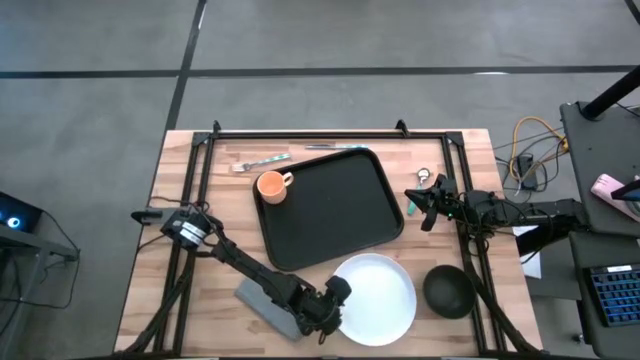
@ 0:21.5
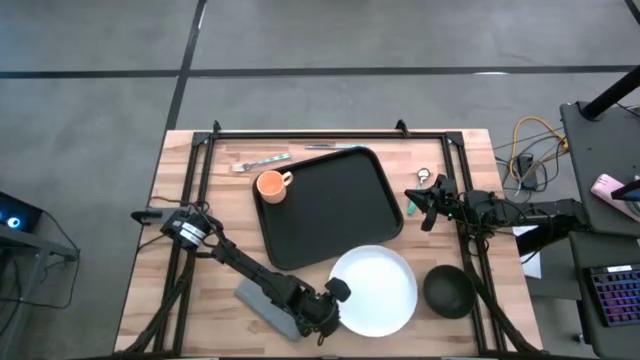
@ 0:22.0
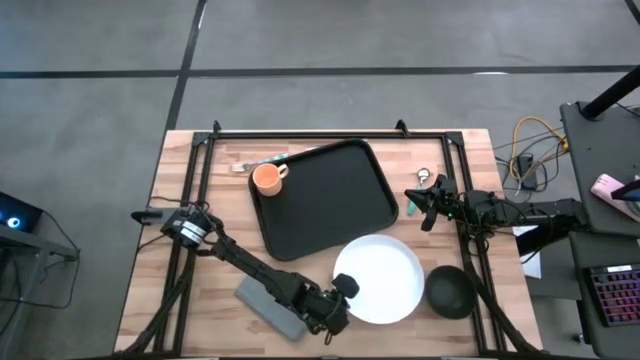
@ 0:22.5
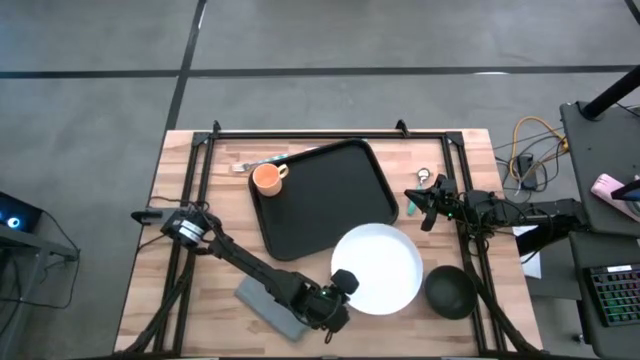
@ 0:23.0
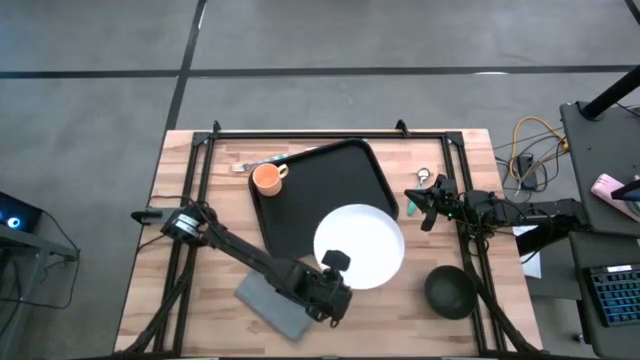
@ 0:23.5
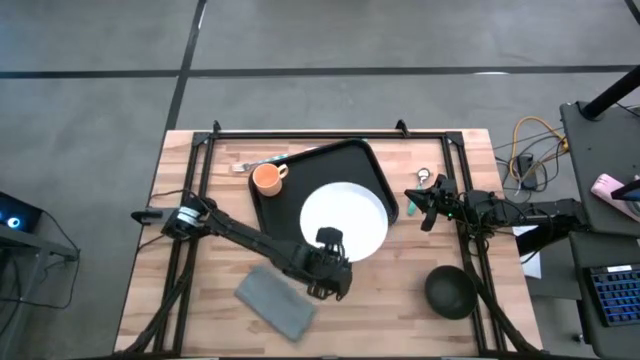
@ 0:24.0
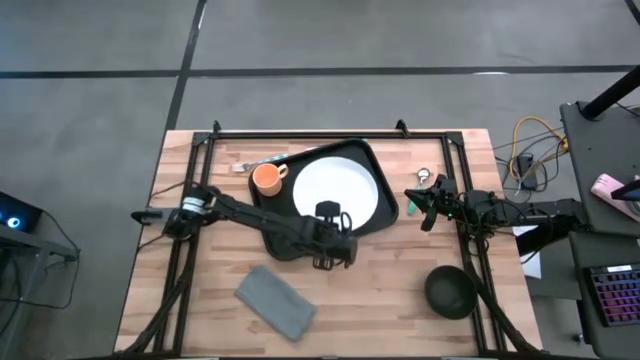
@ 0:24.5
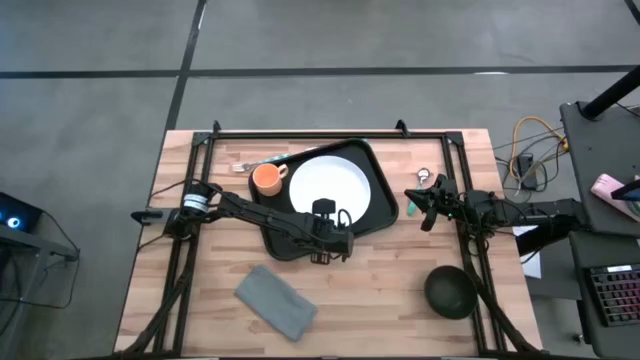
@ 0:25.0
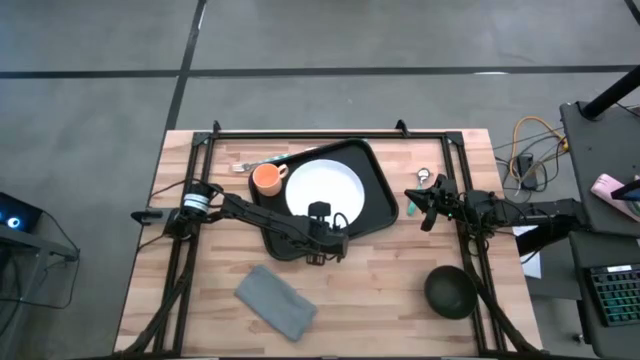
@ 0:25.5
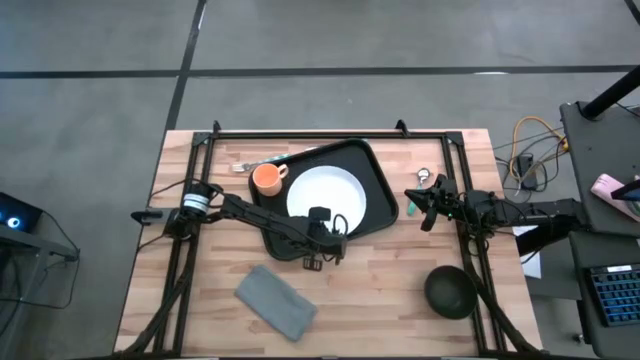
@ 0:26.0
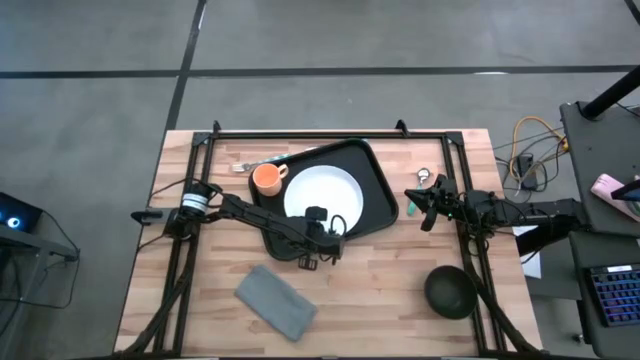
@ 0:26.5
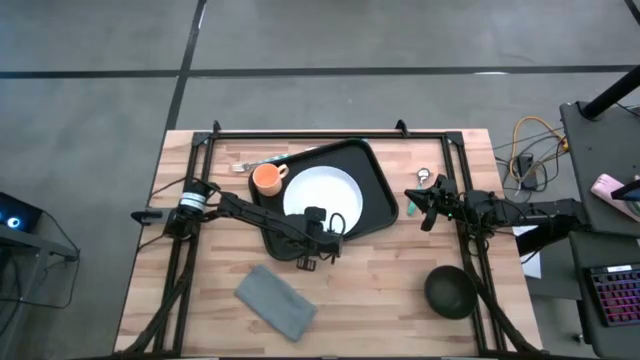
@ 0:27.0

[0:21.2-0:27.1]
Task: Set up tray
Put the white plate on the black tray to the right of the light orange mug

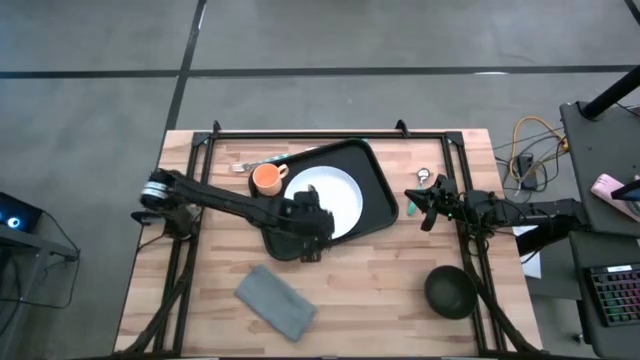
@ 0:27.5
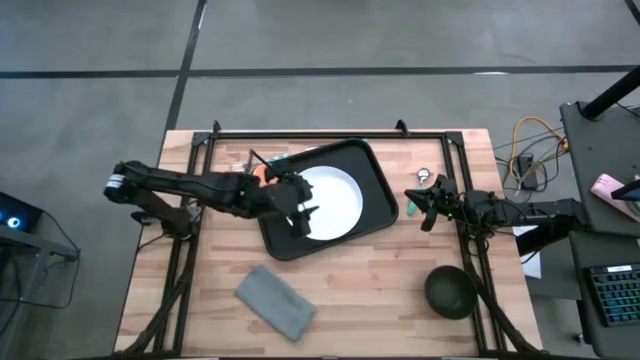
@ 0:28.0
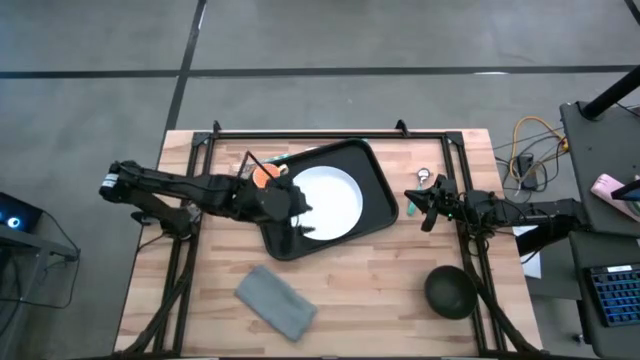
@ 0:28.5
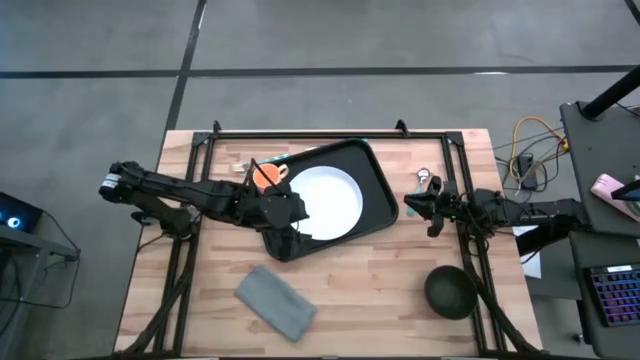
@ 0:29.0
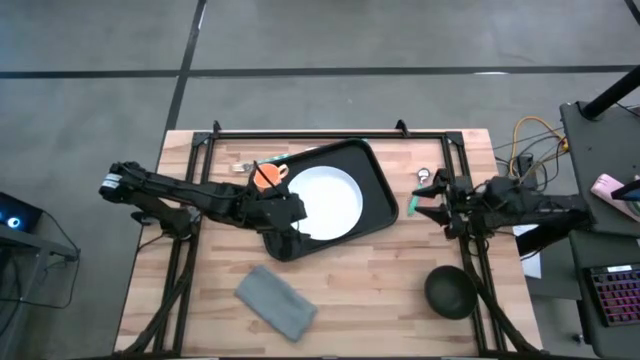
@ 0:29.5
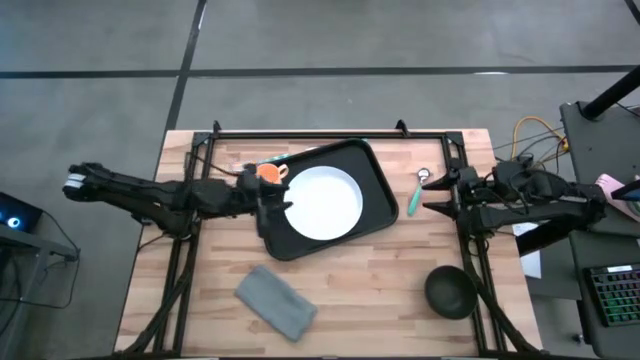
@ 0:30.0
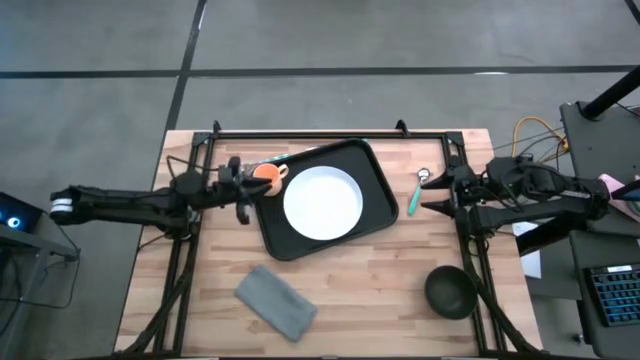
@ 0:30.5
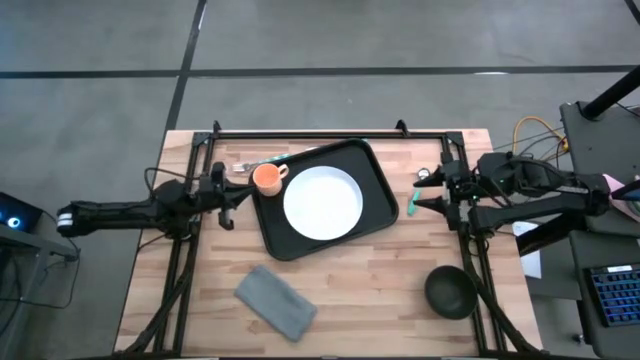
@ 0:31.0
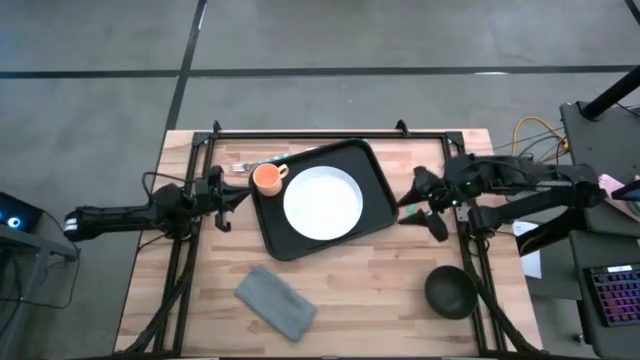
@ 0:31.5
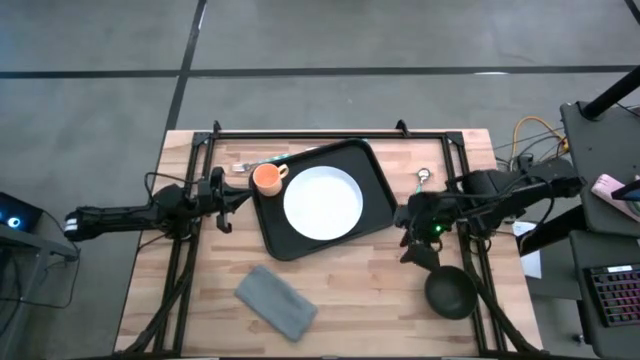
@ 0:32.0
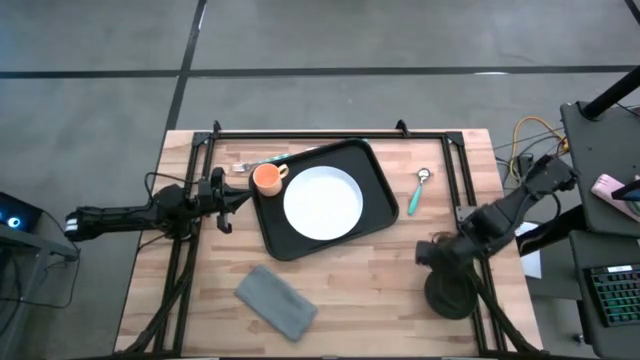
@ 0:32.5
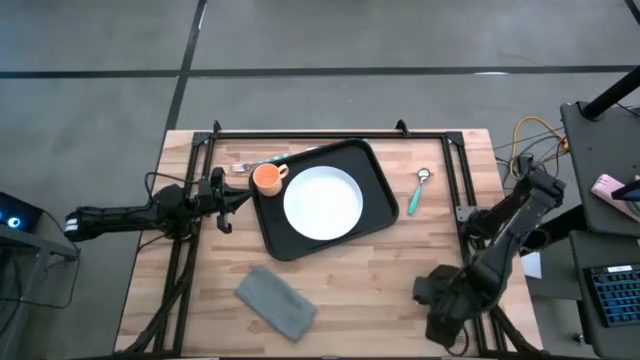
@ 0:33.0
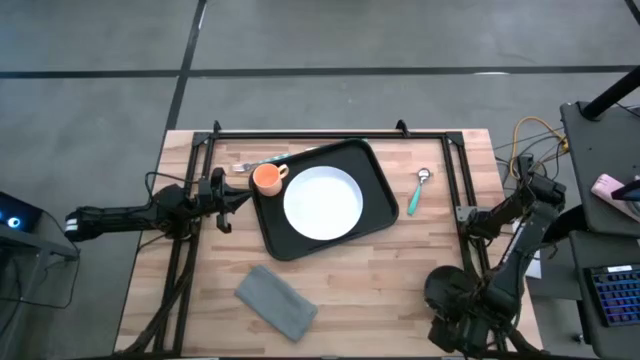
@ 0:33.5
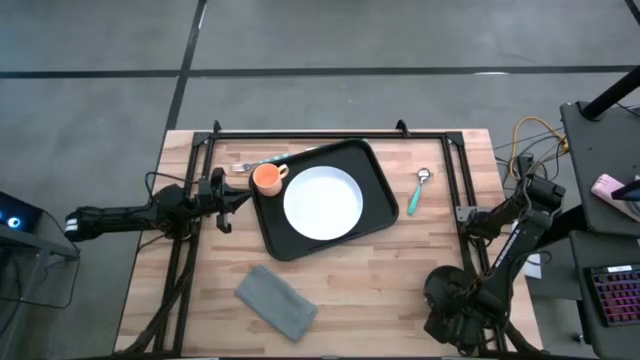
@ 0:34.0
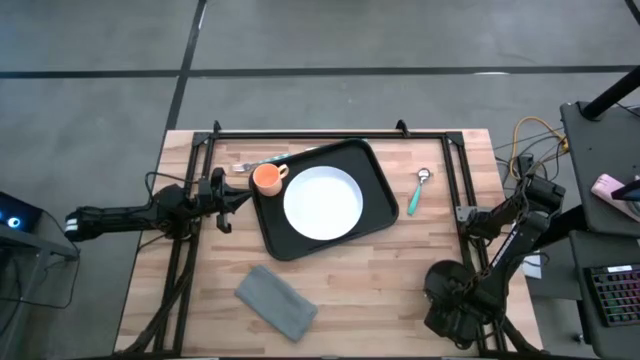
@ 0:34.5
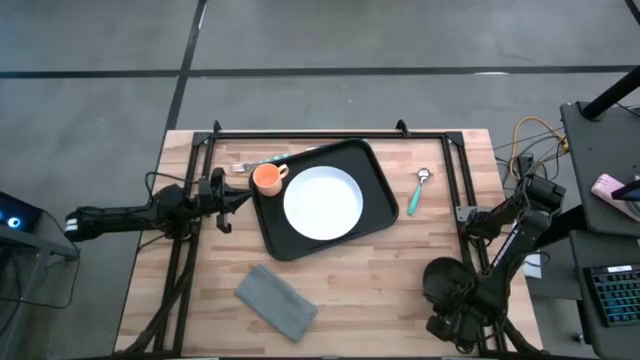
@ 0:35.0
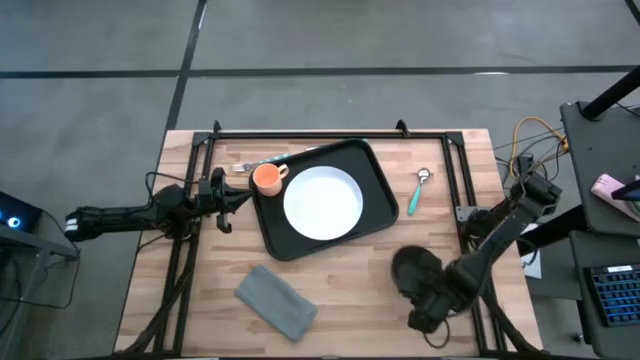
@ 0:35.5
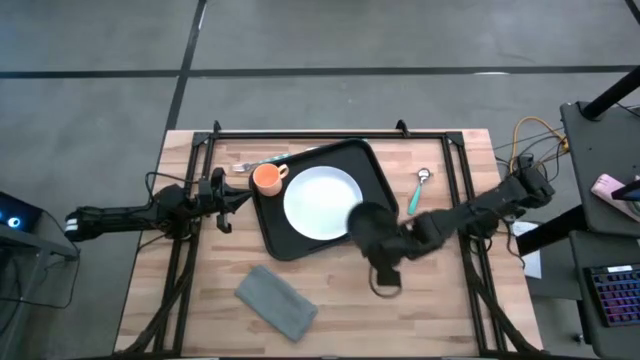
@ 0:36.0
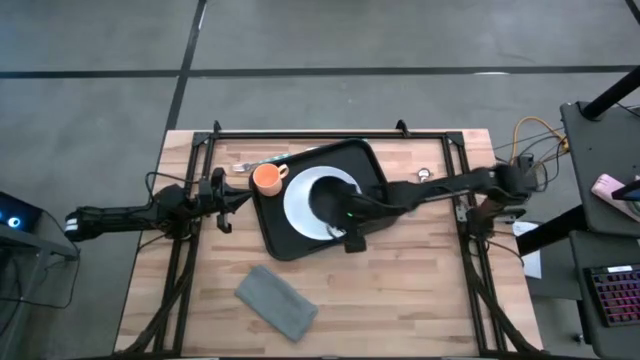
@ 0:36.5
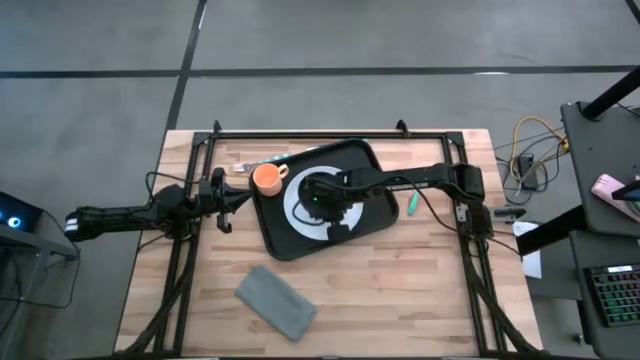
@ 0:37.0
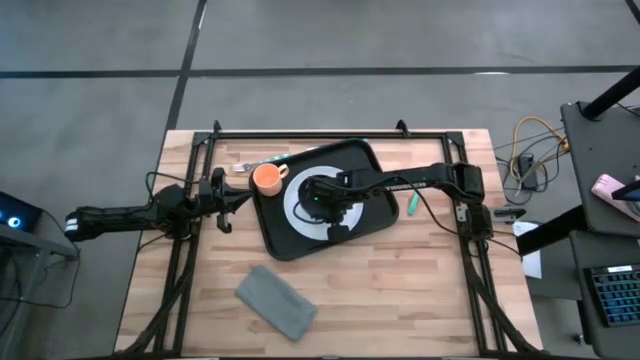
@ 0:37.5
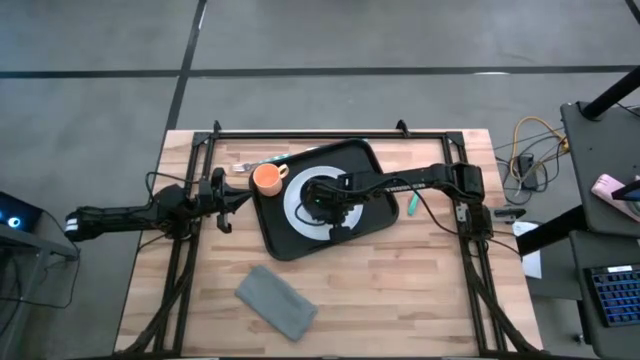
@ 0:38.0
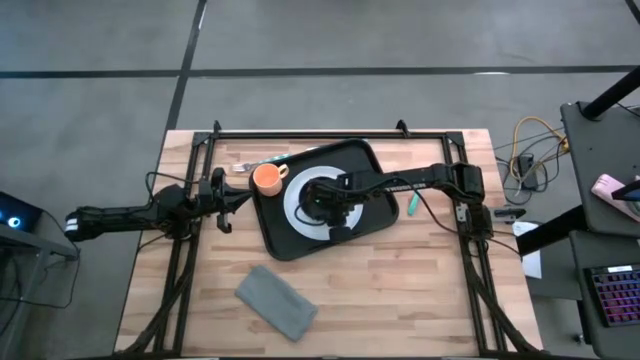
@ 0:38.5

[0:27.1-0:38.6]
Put the bowl on top of the white plate on the black tray

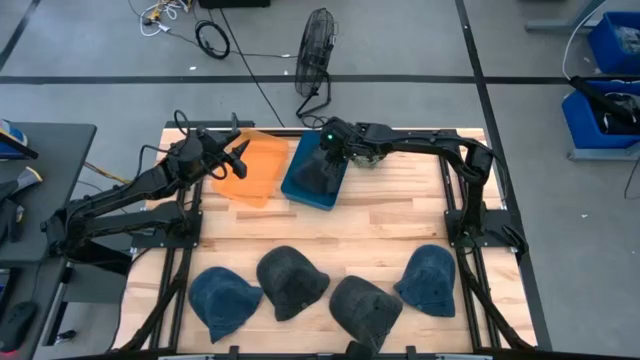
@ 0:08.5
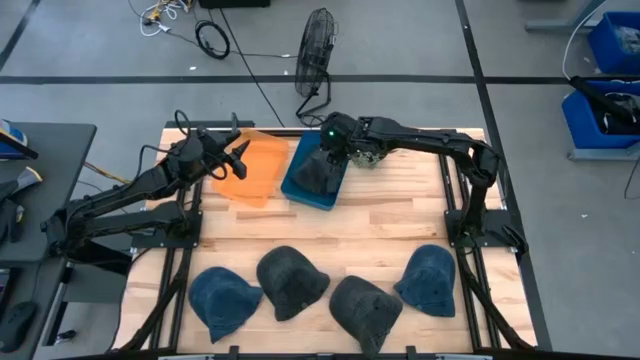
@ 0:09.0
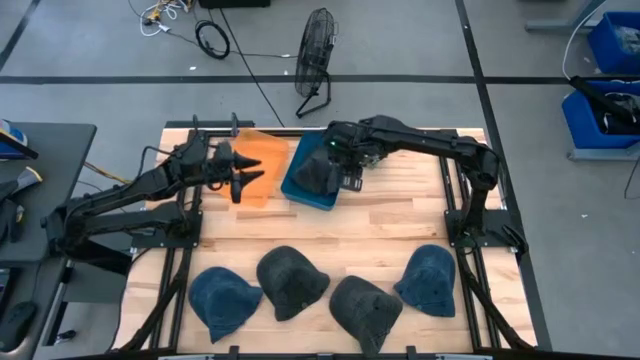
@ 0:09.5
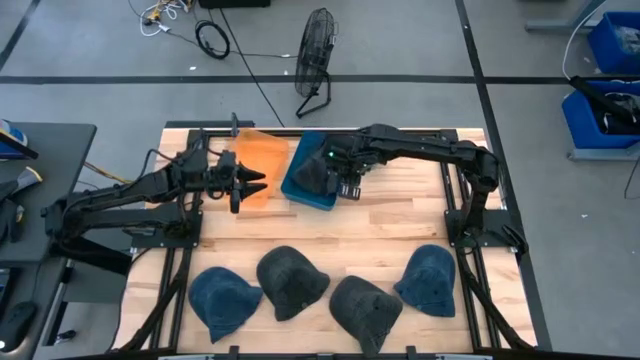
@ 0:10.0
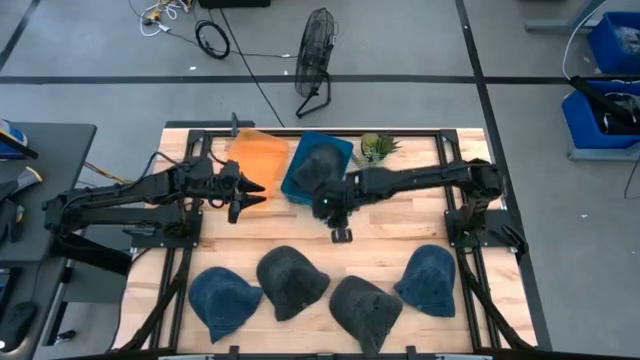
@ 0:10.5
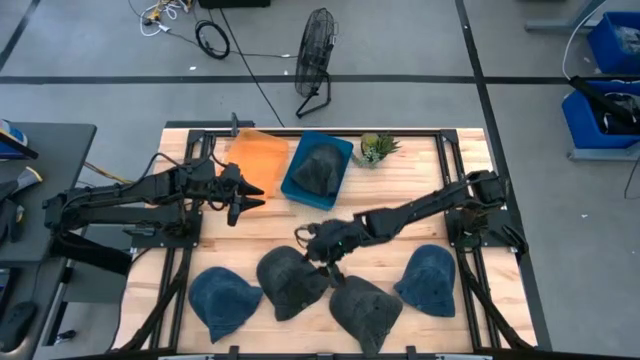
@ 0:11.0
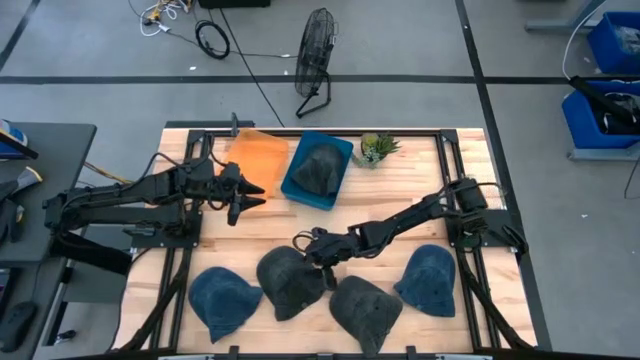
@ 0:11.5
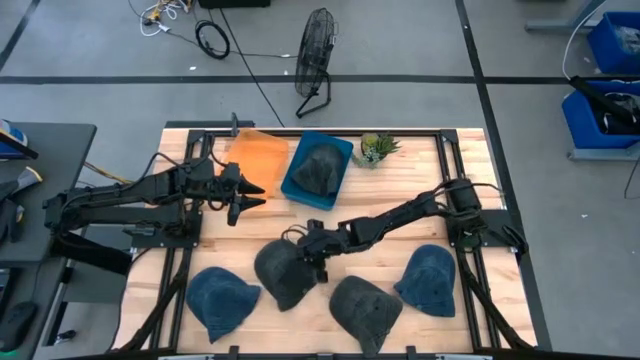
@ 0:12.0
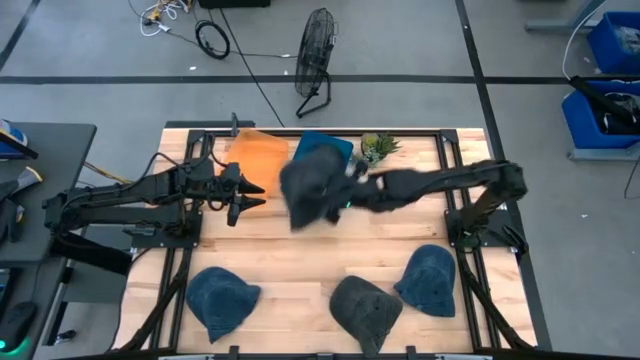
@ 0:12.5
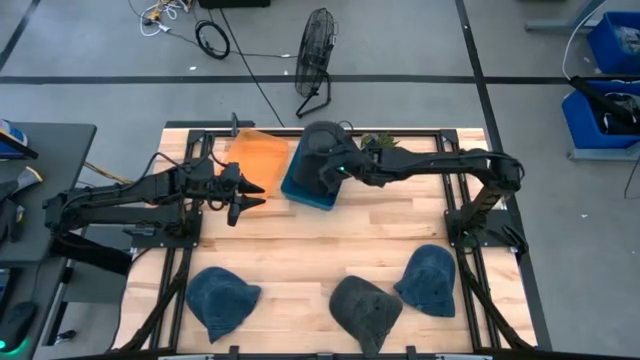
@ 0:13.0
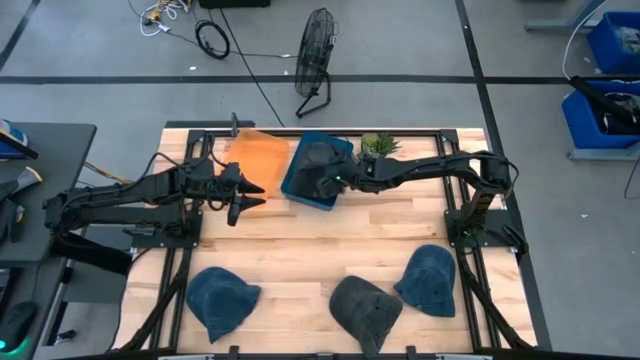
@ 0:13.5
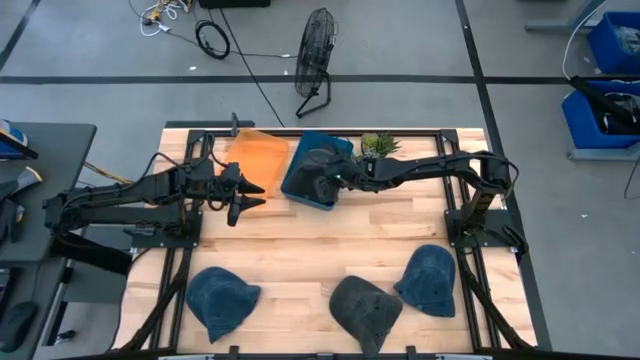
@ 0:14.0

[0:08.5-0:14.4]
Task: Pick & Place hat
Put the left black cap into the blue bin
